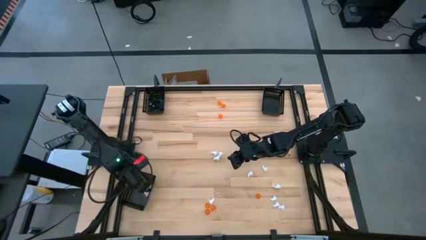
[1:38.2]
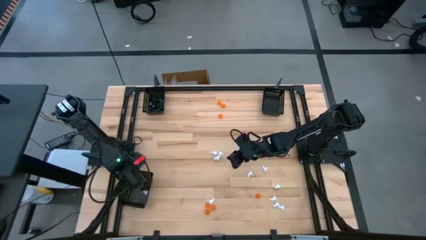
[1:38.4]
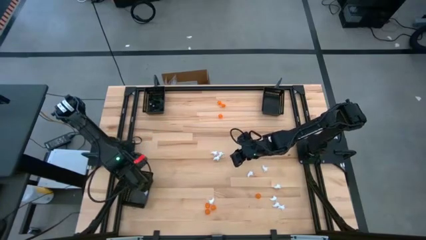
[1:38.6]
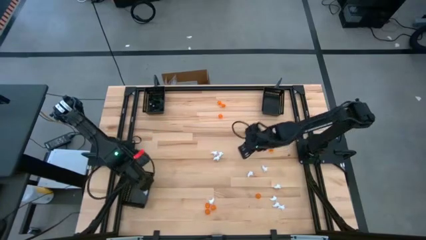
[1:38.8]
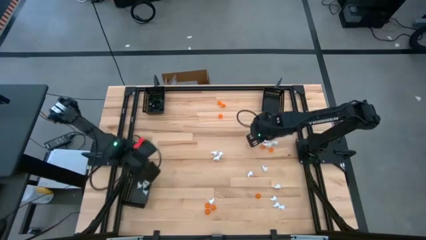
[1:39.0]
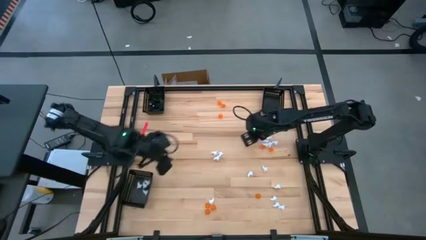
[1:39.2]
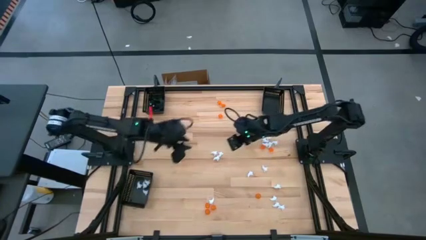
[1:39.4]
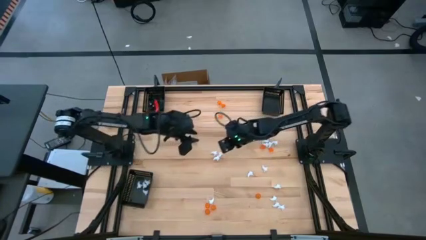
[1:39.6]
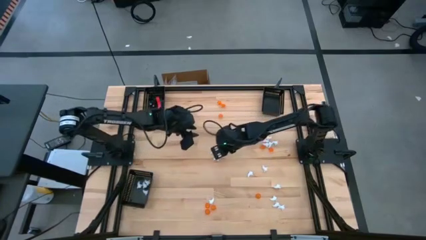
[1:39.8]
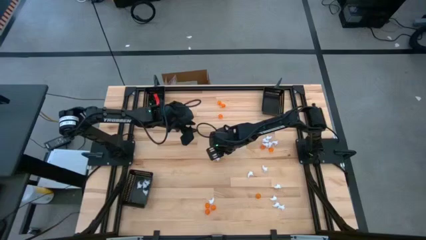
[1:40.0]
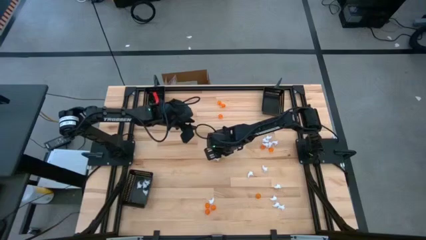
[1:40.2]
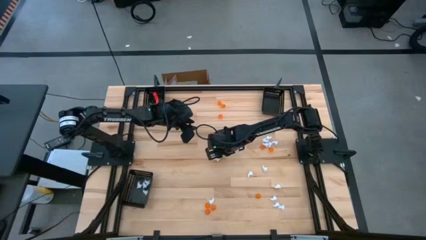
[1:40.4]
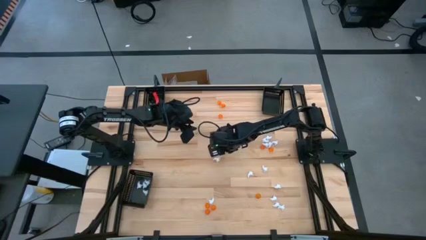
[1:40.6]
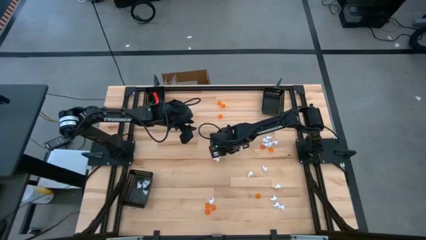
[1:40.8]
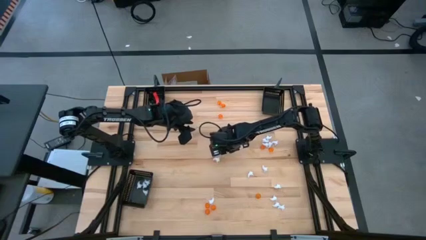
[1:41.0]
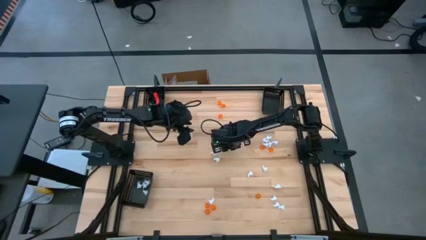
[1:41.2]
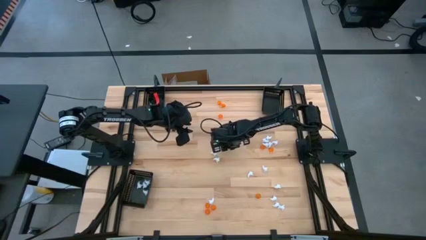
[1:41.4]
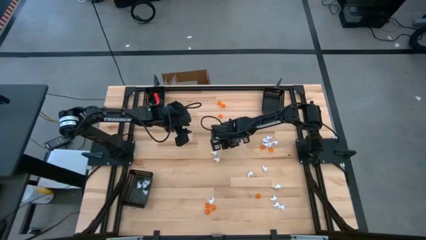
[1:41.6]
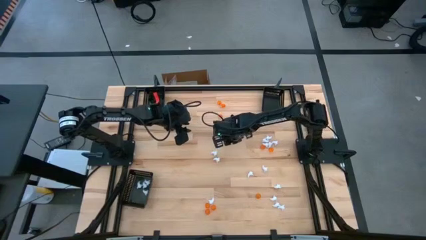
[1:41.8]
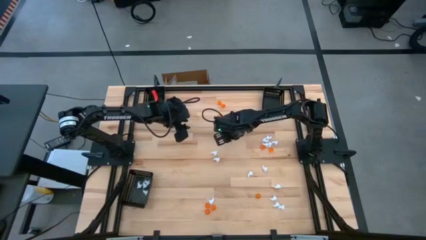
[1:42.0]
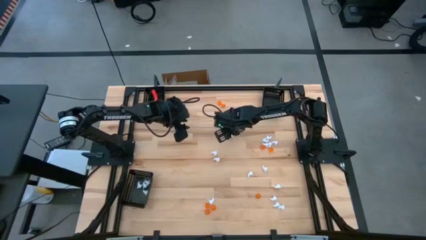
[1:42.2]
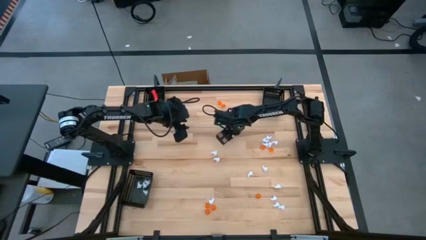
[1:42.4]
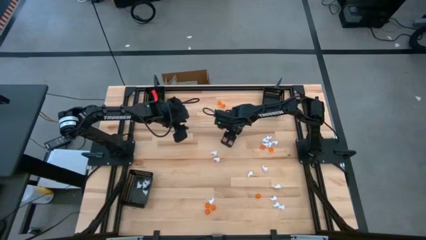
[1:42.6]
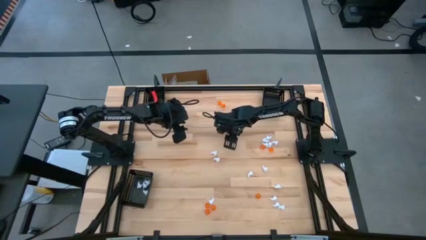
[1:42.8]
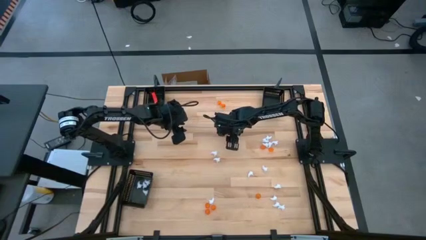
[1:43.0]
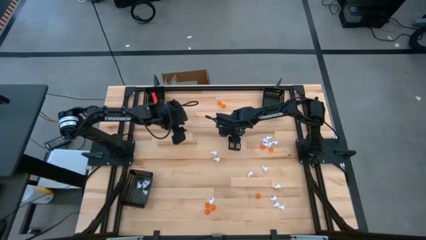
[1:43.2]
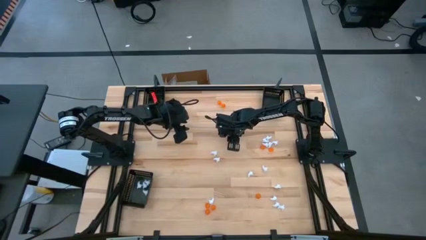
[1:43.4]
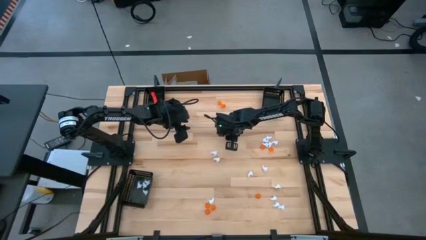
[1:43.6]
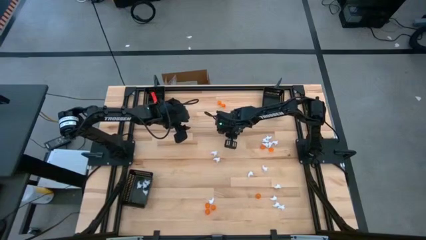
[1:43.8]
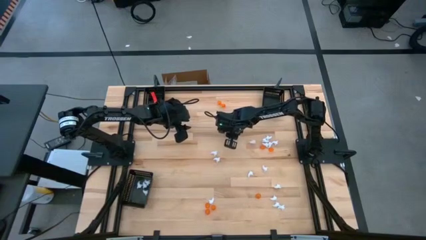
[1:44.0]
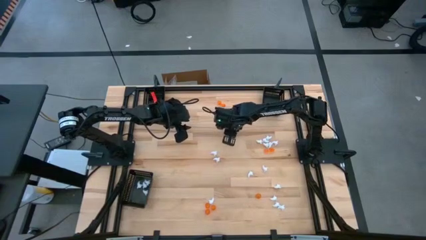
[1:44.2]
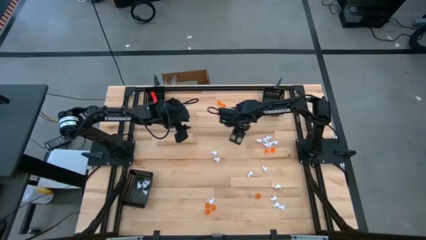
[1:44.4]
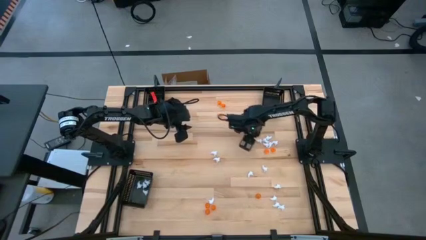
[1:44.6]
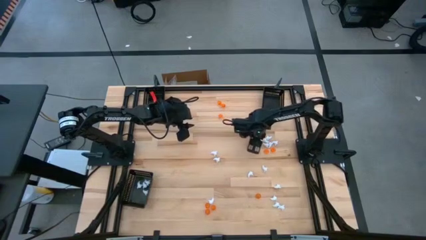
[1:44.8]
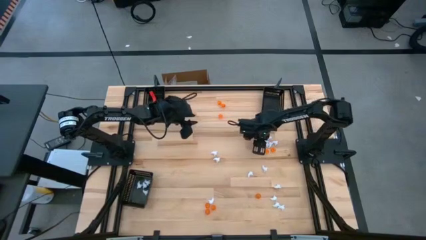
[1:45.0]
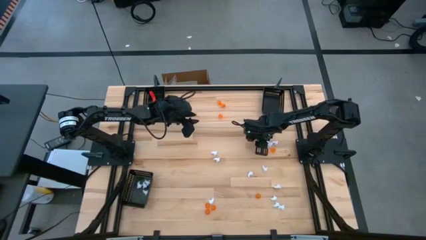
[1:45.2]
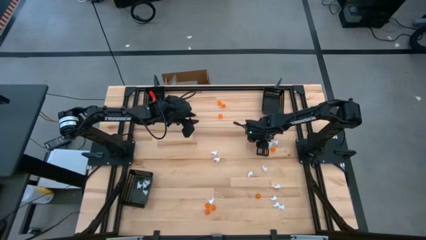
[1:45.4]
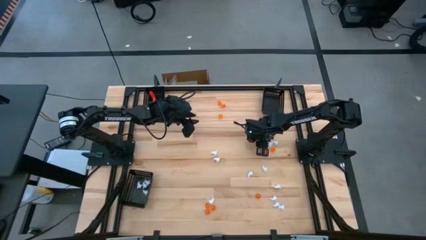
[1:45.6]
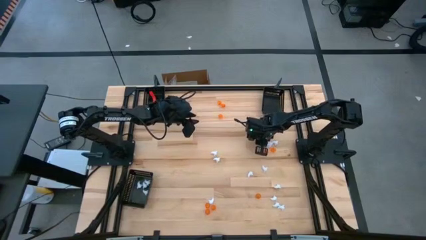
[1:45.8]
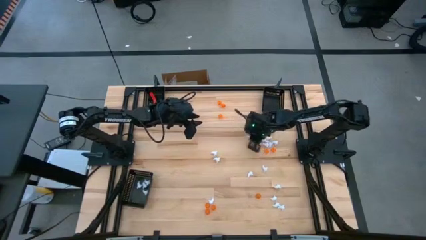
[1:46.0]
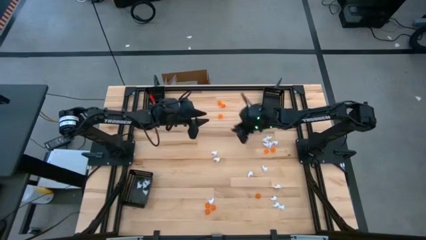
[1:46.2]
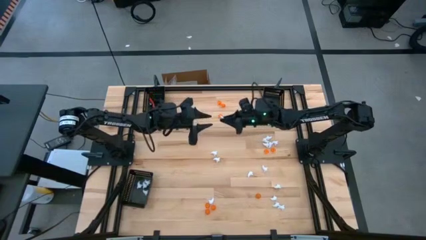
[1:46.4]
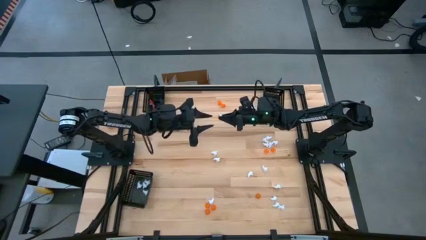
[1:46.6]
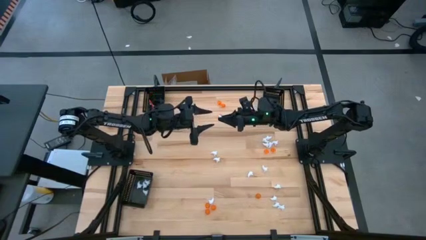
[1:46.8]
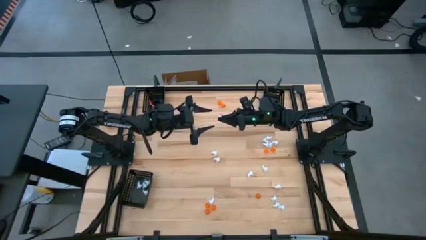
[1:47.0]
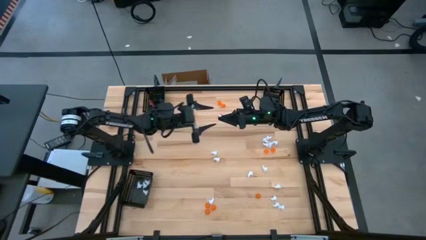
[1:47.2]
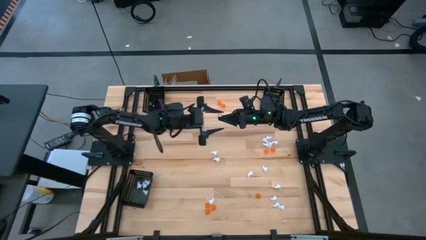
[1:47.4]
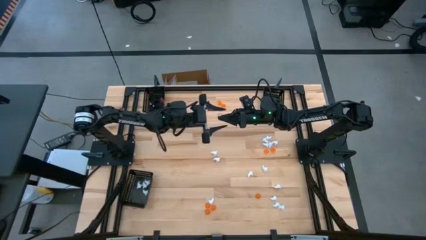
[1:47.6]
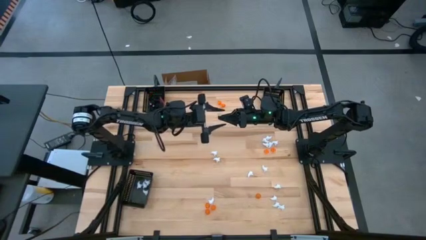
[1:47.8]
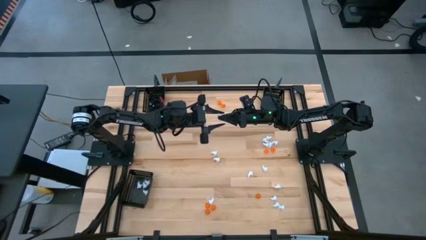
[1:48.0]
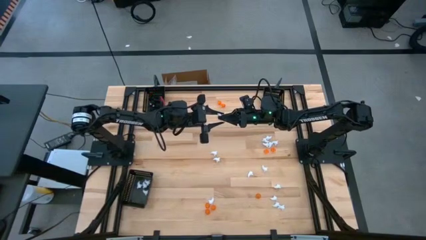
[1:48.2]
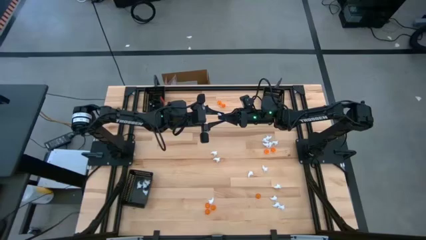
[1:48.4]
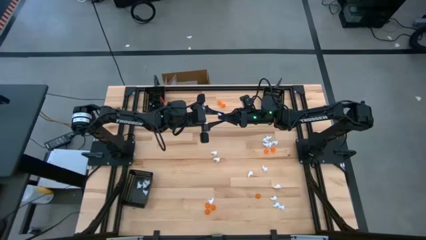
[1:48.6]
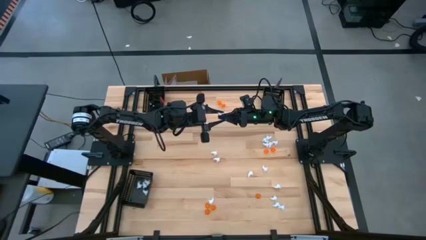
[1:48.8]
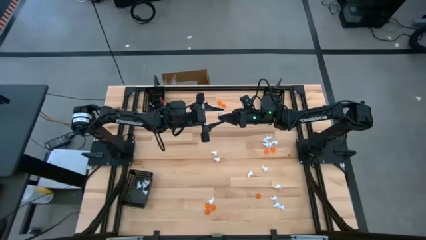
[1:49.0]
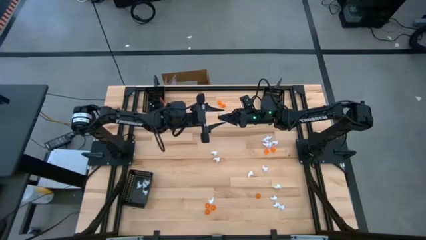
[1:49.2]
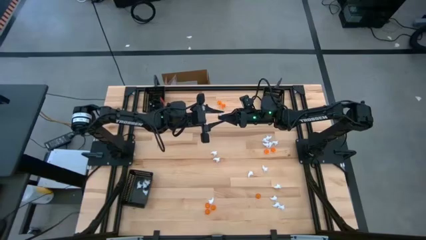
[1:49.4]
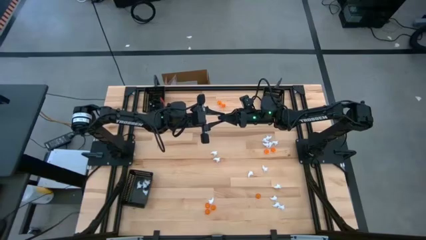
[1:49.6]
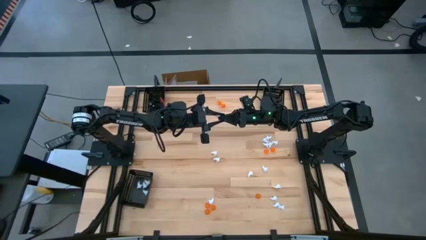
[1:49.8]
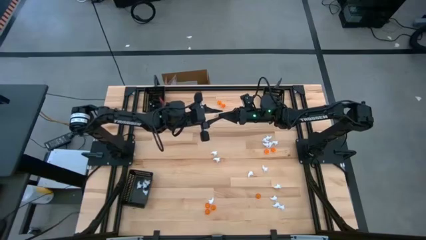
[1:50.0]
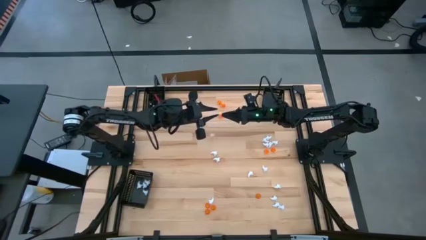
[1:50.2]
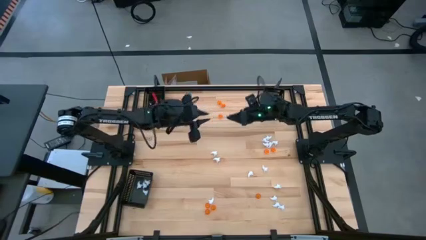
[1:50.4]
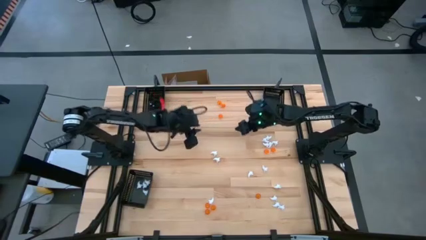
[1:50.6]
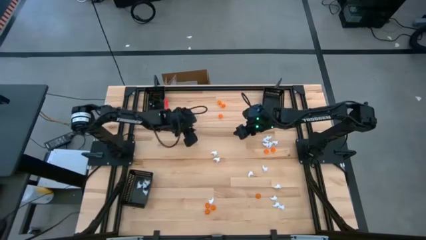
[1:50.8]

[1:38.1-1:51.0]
Task: Sort Halloween decoration
Put the white ghost toy into the bottom black basket

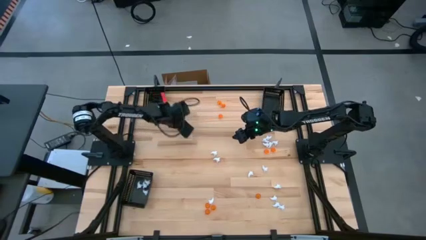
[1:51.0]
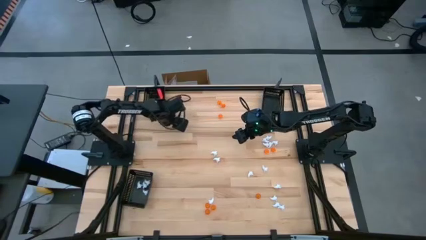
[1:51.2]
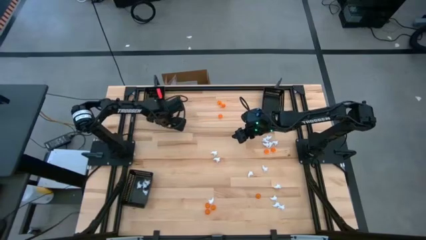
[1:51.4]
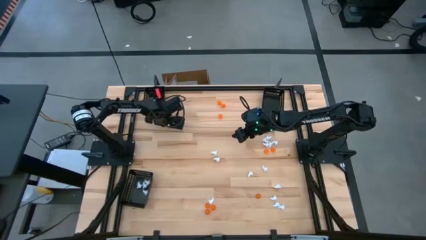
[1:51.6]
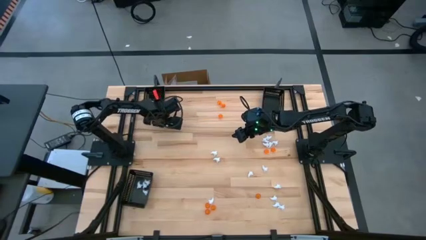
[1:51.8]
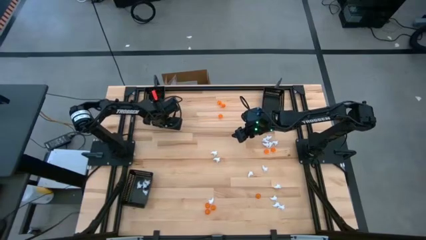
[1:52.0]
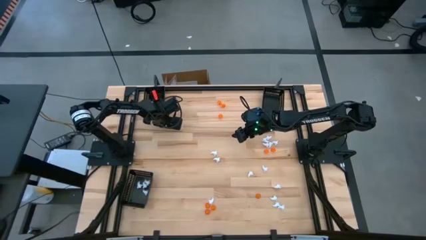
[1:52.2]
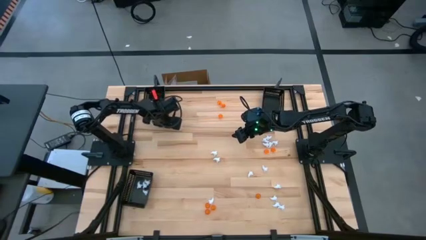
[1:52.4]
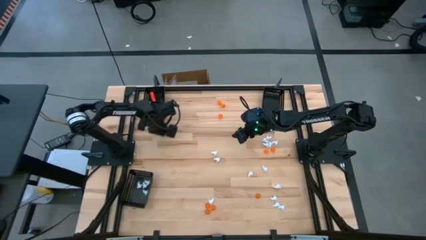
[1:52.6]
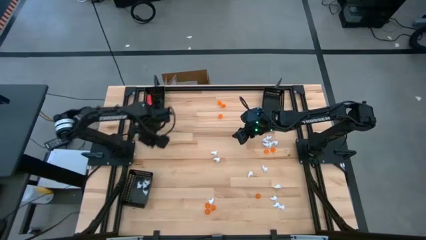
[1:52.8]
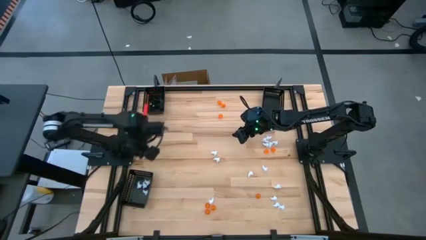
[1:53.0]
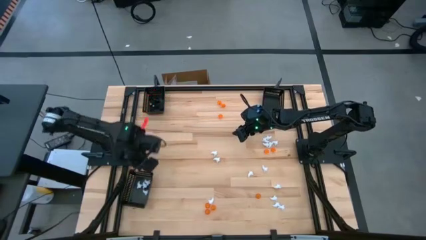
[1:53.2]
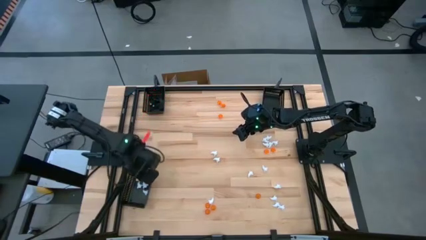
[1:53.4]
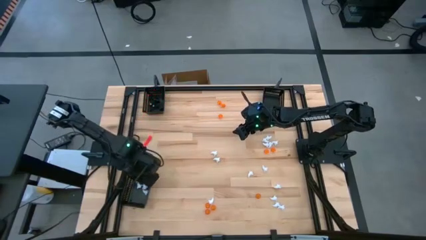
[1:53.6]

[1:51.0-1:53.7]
Put the white ghost toy into the bottom black basket

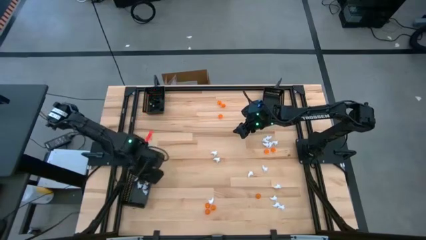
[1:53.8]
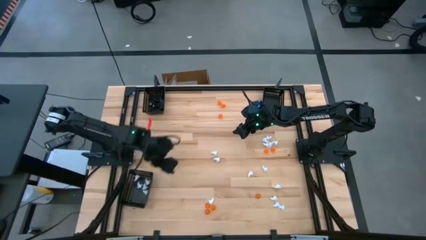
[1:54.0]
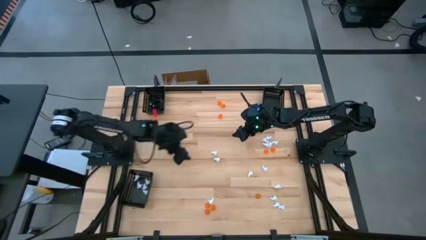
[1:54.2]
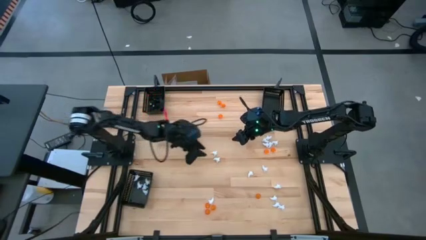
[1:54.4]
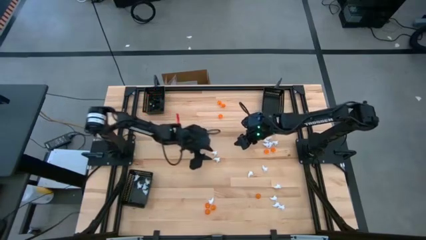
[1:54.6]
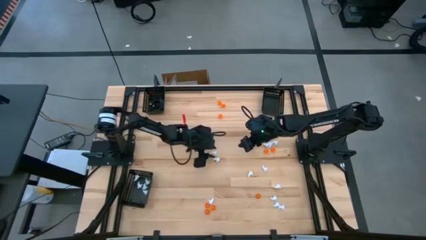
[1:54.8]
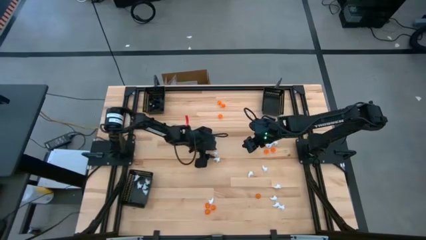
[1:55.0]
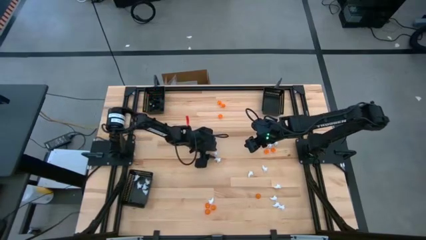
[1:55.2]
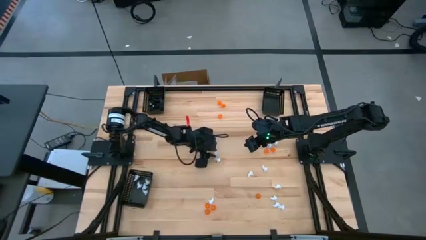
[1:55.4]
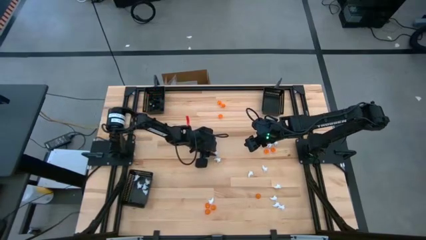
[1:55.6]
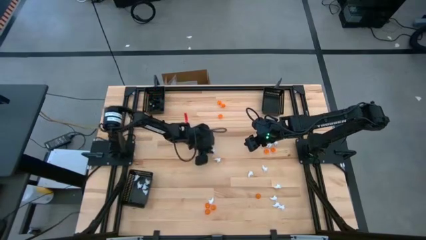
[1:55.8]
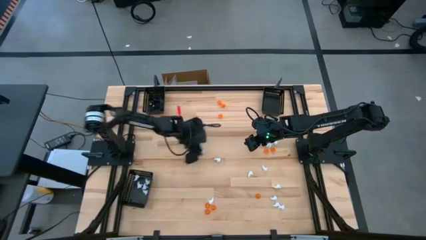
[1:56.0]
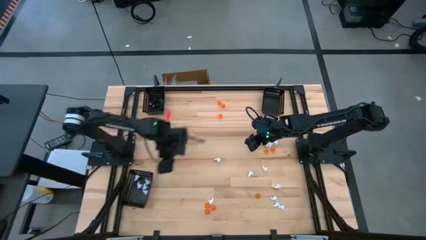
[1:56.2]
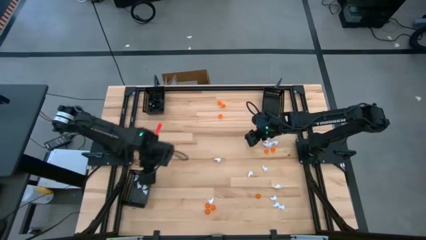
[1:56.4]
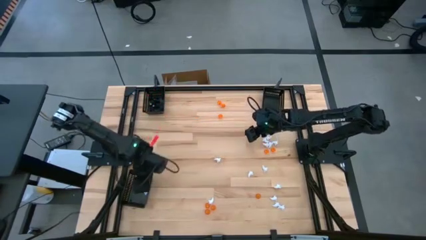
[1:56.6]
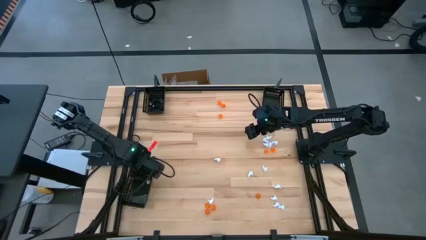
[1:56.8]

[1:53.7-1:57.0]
Put the white ghost toy into the bottom black basket
